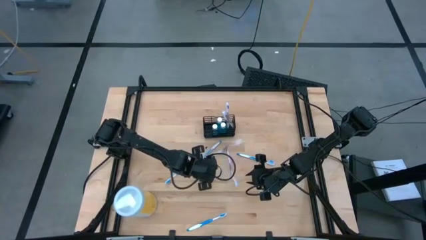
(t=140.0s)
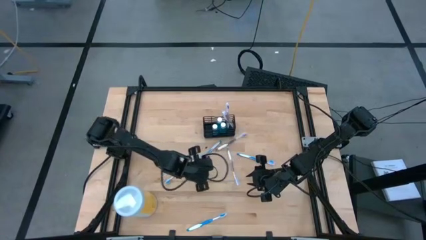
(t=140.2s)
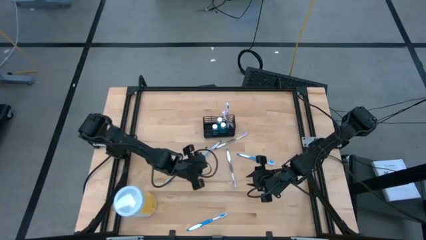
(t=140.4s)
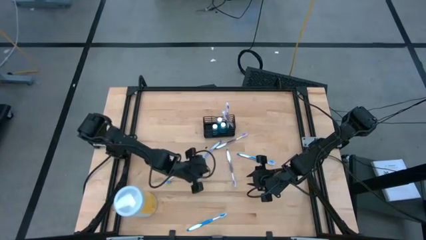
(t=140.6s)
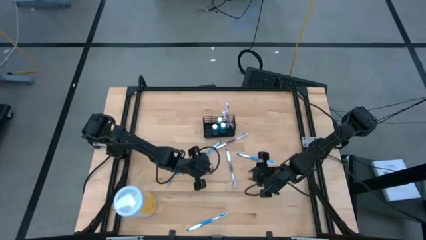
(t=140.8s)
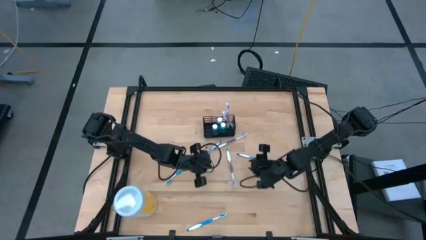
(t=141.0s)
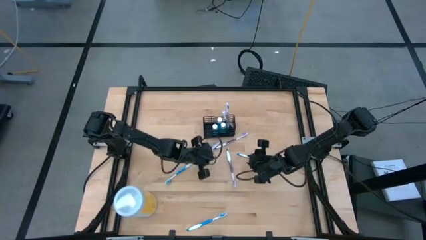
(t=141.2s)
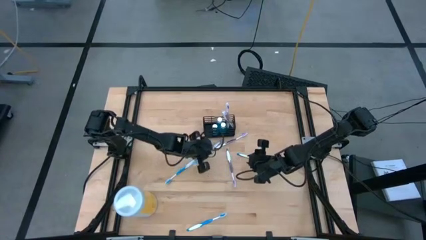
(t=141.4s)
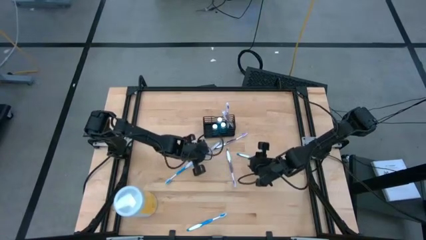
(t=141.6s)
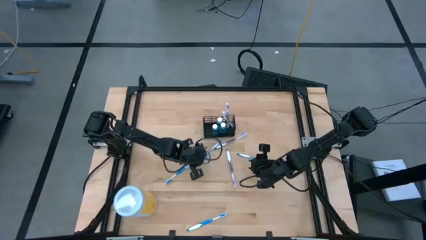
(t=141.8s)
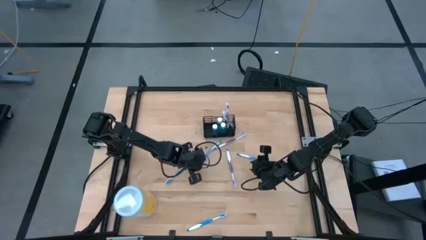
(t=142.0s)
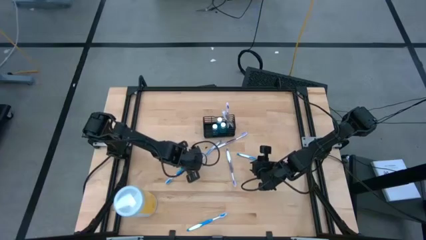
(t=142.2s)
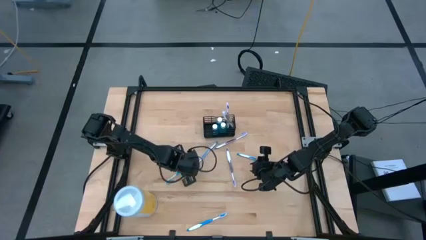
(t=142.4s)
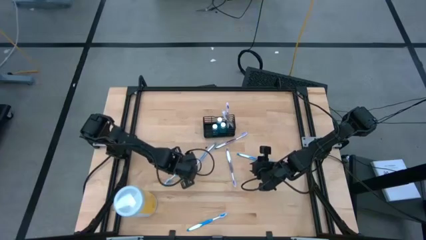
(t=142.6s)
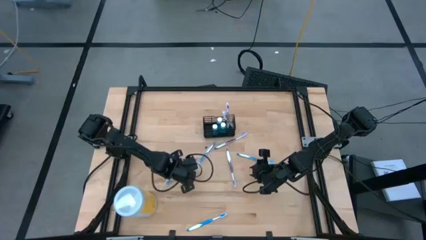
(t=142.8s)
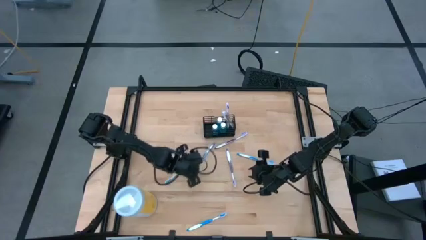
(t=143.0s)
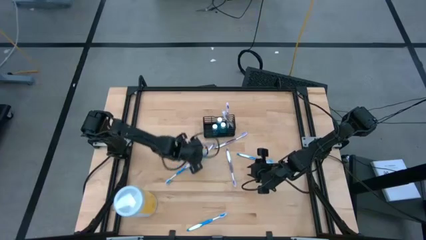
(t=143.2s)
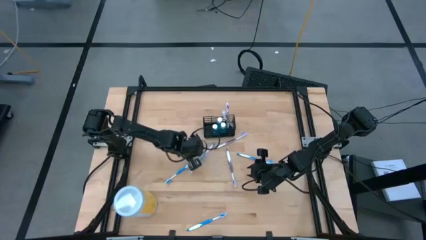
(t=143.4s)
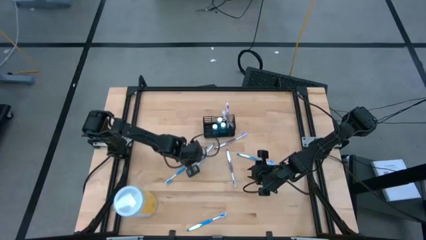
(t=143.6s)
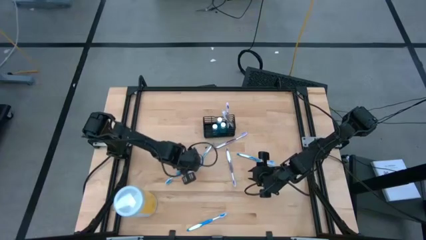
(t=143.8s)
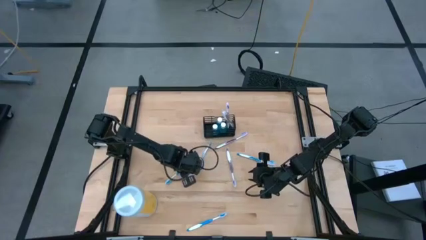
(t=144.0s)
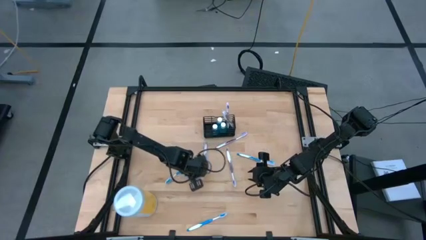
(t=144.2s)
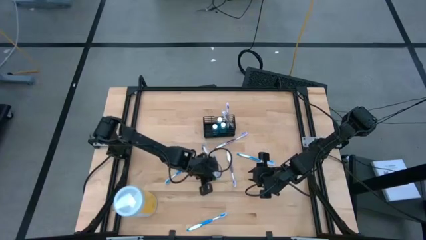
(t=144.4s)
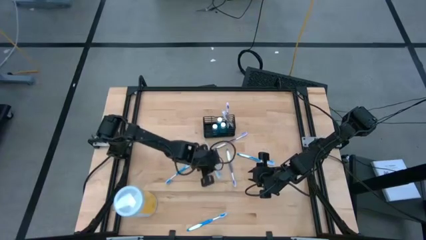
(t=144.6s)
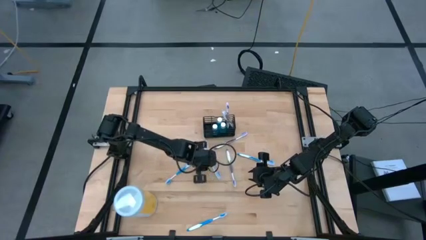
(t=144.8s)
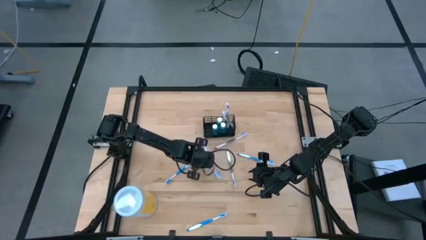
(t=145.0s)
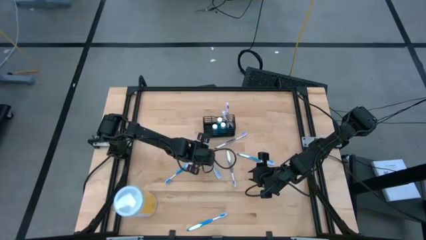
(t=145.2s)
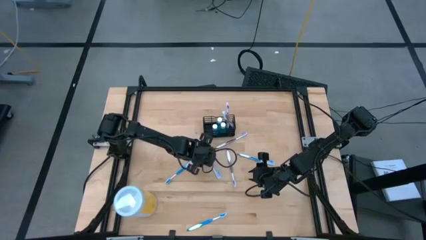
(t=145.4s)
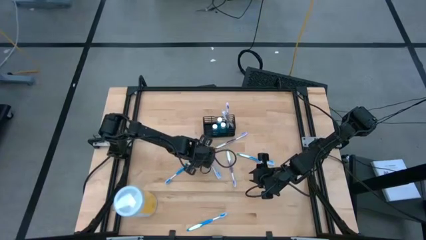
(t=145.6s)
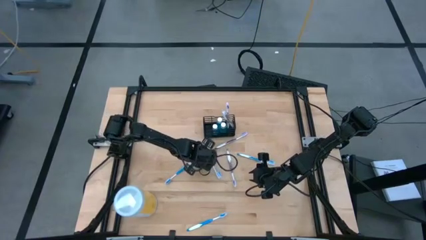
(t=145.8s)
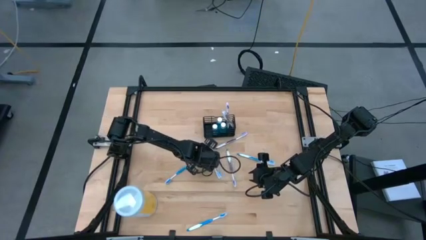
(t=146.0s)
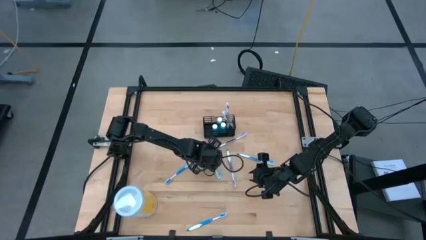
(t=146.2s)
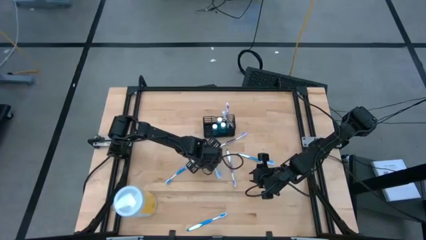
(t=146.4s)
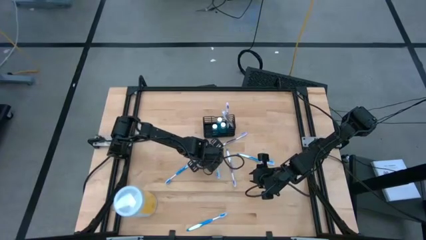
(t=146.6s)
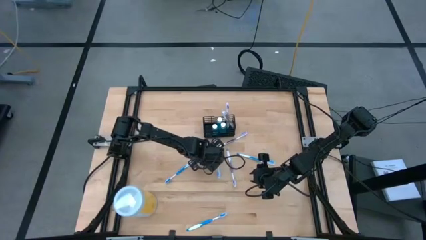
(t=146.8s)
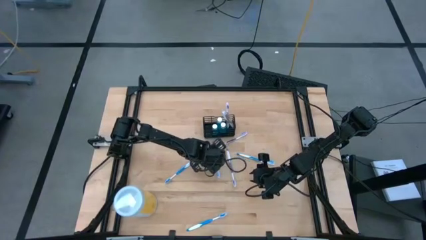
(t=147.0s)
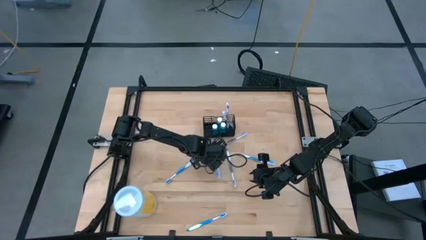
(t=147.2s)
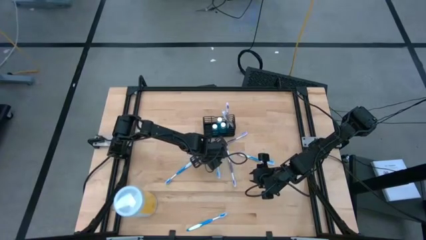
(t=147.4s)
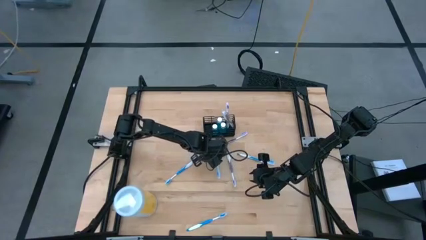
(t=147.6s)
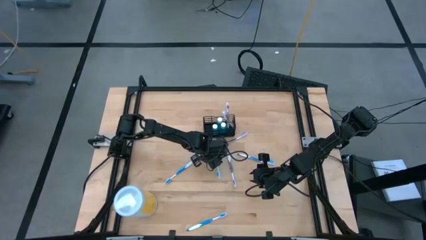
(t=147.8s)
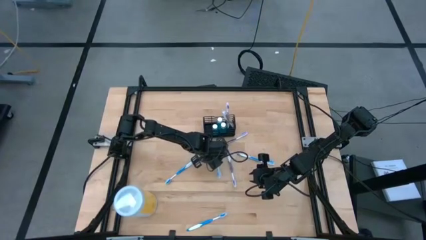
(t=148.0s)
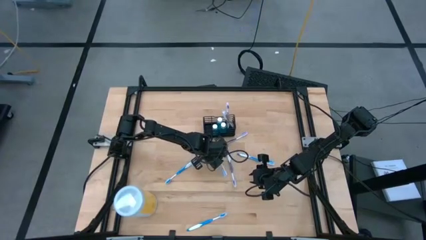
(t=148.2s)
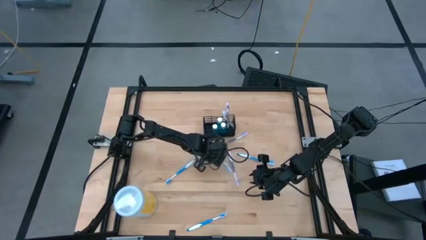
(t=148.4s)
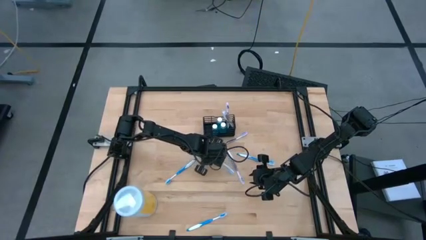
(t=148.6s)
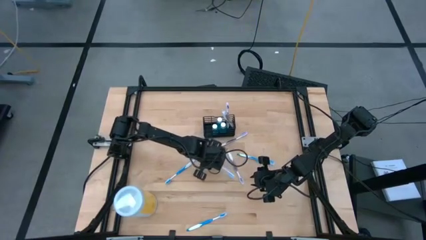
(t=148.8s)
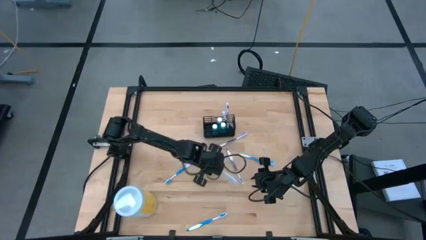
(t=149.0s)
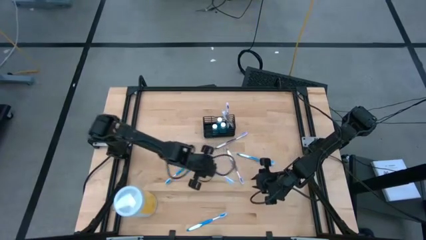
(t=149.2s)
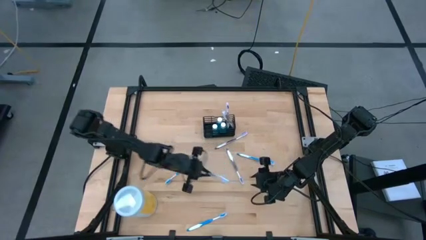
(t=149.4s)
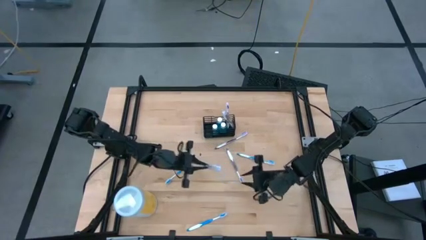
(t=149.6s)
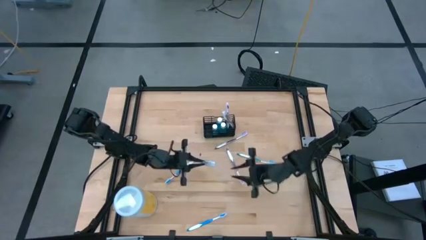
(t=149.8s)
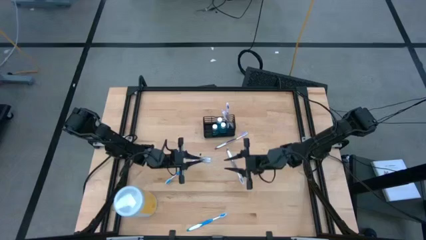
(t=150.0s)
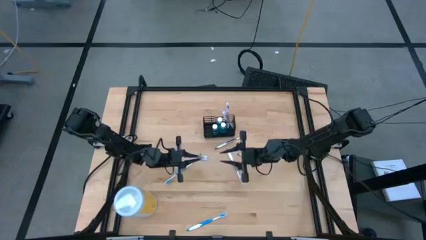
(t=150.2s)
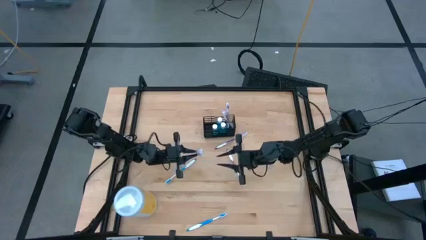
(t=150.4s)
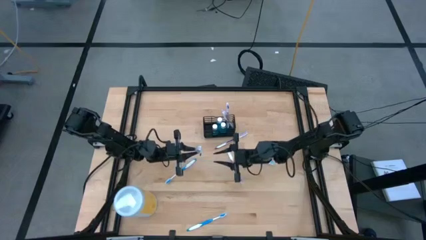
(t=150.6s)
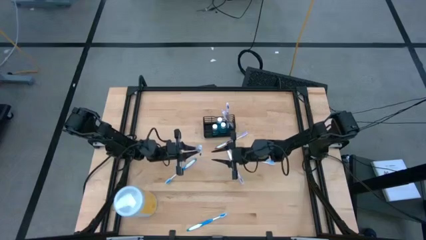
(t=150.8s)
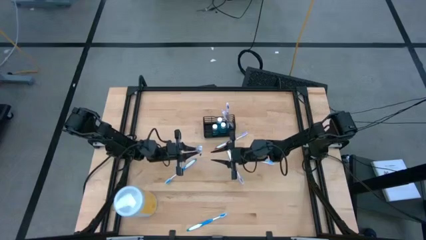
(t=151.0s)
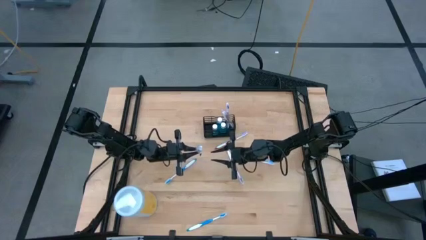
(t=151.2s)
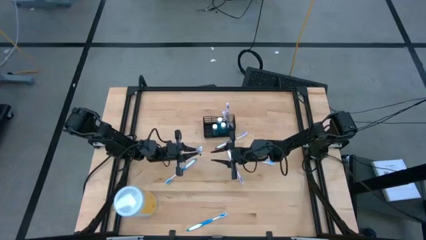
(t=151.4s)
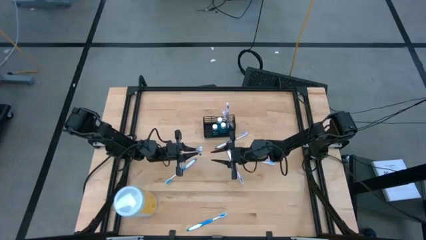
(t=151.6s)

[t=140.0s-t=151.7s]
Task: Pick & Place toothbrushing station
Put the blue toothbrush into the black organizer
